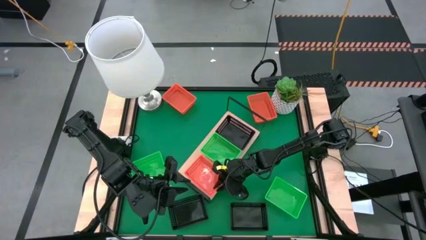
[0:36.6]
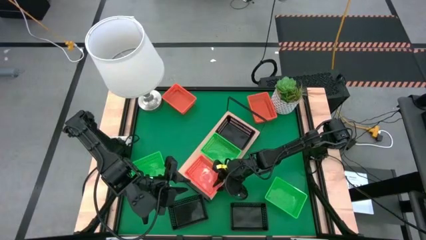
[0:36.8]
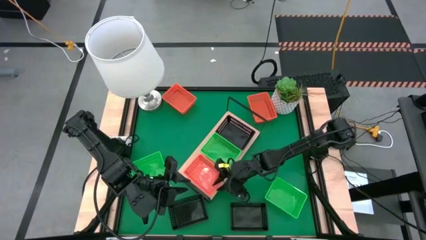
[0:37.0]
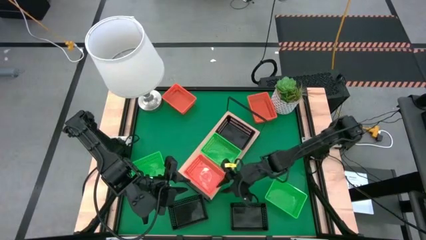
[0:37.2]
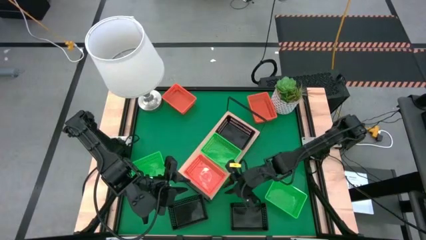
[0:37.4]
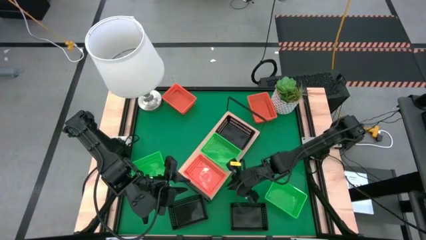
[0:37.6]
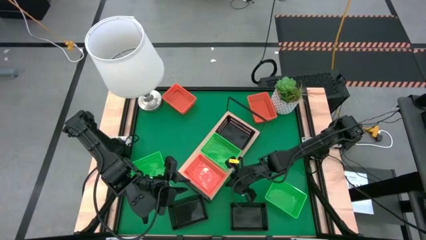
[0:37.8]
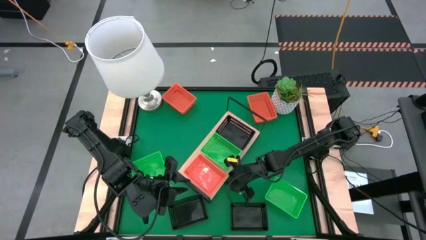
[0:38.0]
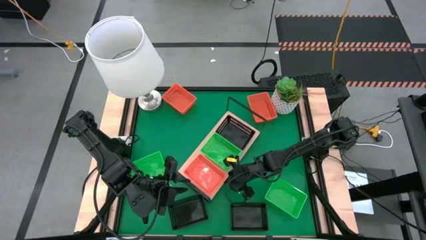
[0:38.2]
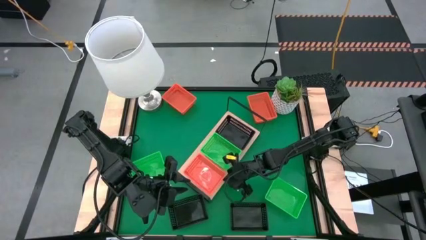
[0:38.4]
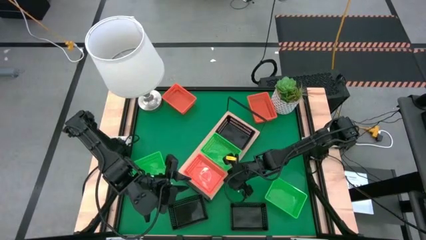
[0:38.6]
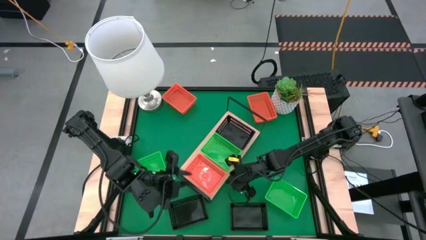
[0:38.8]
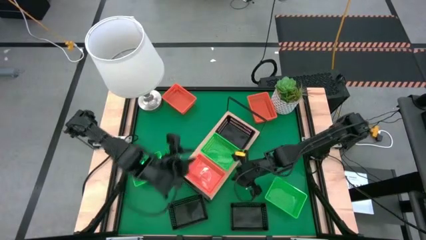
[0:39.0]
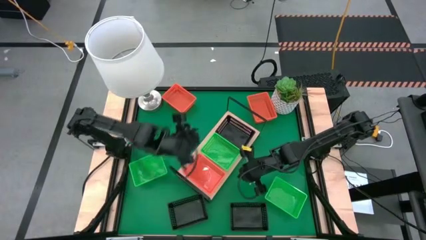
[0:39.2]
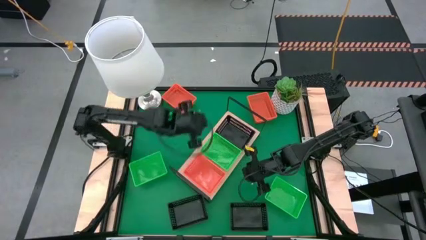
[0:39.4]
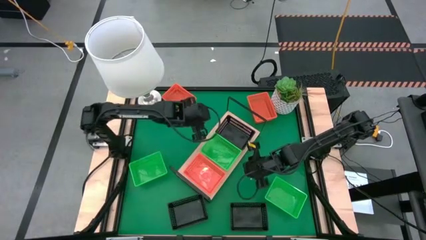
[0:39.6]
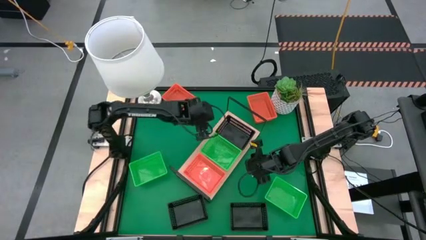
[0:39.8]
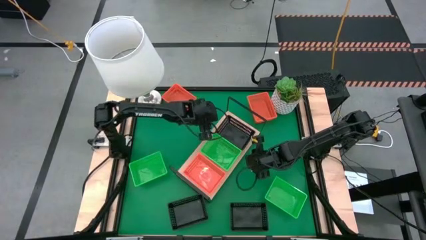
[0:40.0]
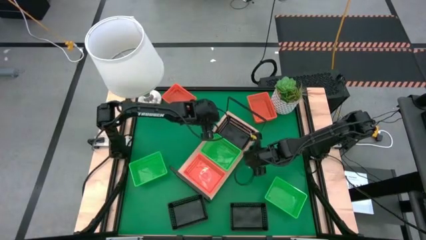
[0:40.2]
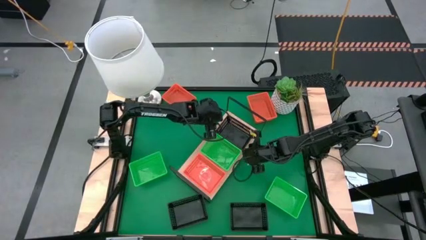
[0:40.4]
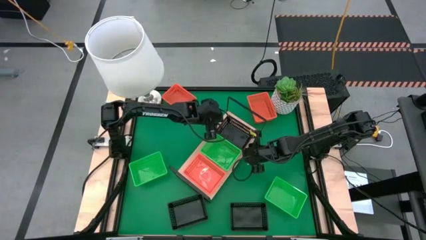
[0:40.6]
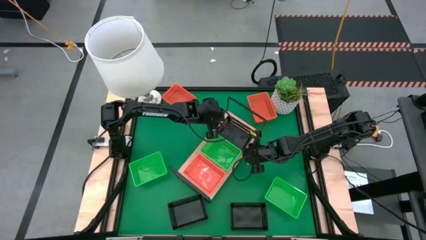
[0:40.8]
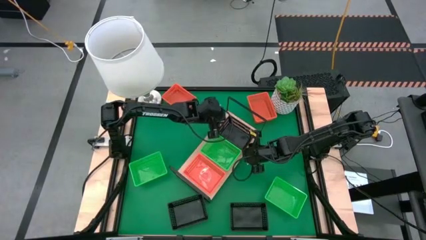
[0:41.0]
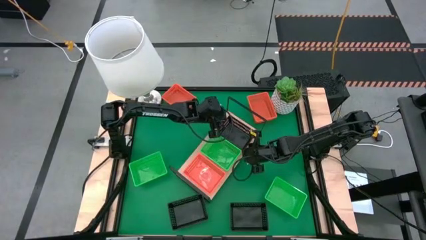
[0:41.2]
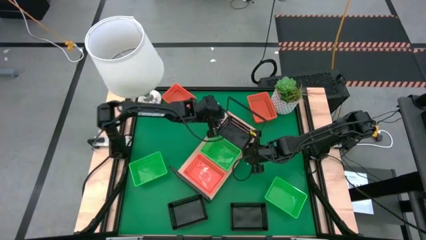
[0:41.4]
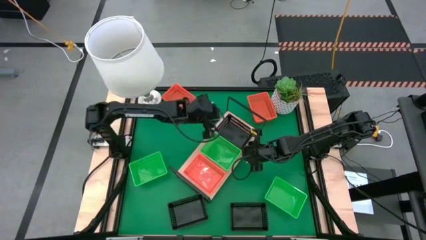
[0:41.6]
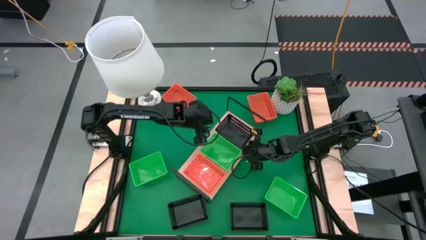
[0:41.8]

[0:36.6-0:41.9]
Task: Stack baskets on shelf by color
Adjust the colored bins

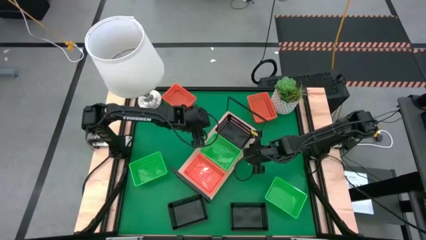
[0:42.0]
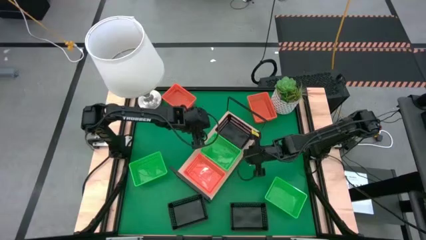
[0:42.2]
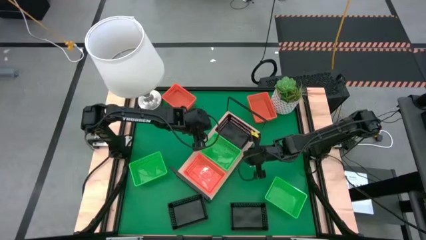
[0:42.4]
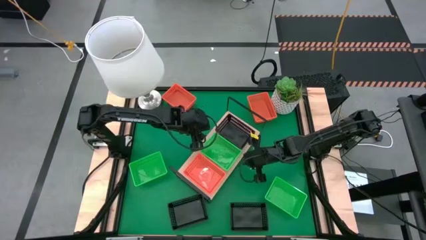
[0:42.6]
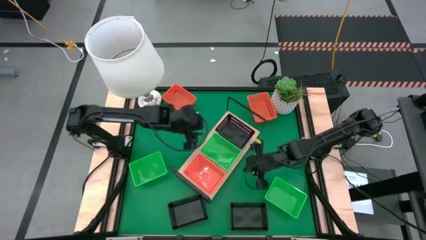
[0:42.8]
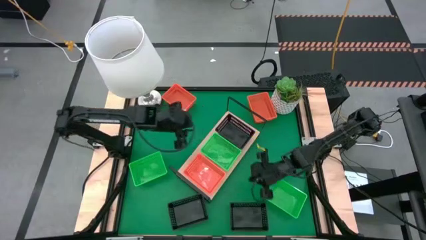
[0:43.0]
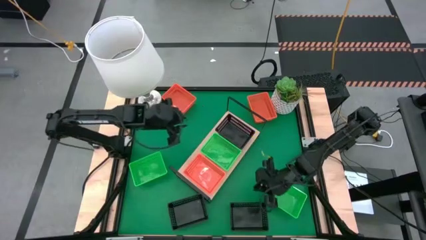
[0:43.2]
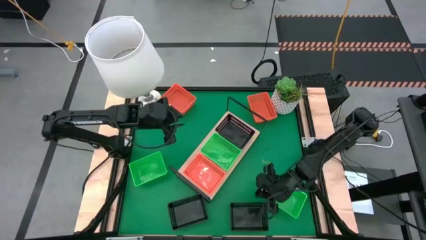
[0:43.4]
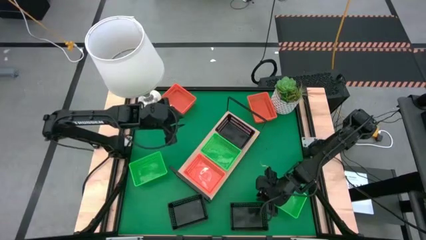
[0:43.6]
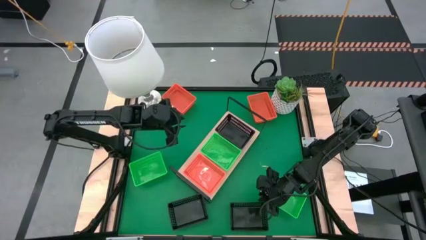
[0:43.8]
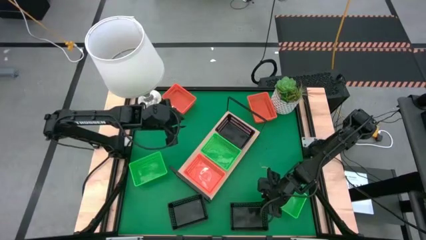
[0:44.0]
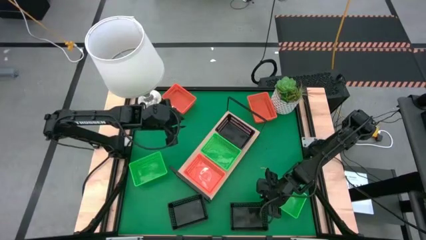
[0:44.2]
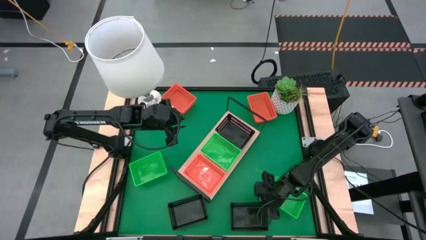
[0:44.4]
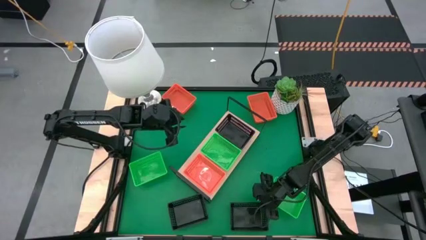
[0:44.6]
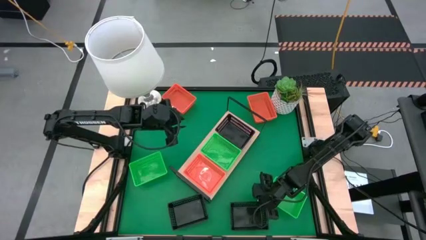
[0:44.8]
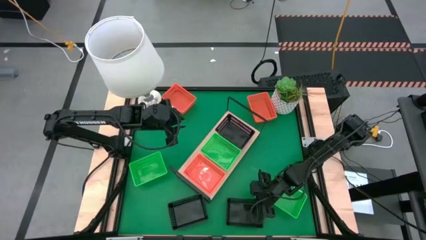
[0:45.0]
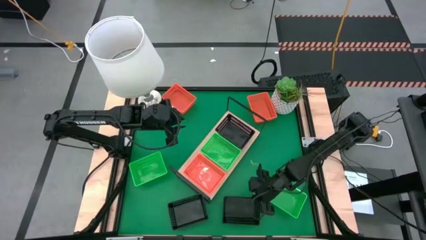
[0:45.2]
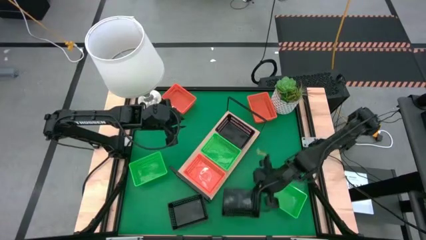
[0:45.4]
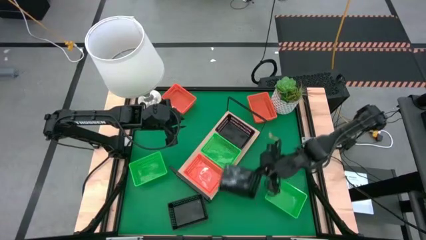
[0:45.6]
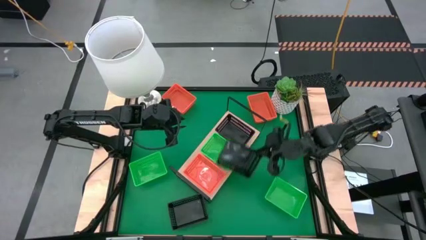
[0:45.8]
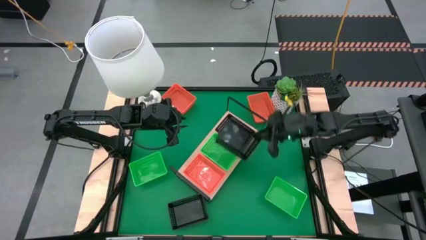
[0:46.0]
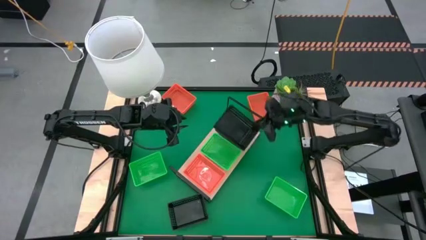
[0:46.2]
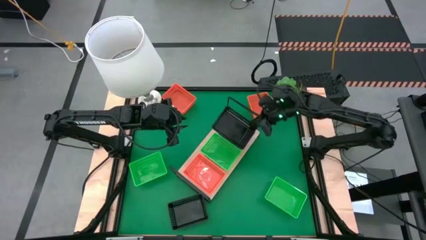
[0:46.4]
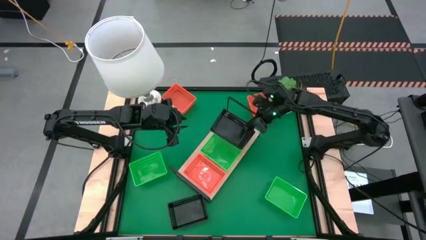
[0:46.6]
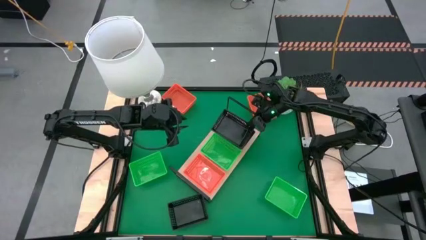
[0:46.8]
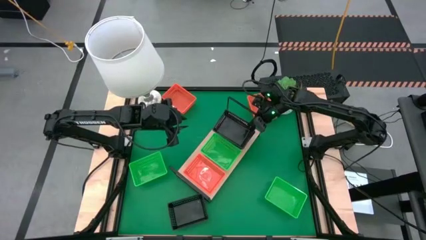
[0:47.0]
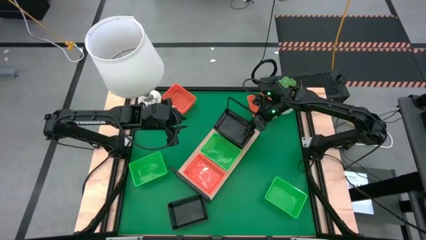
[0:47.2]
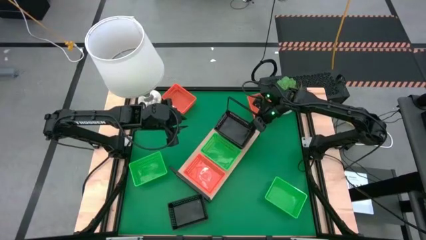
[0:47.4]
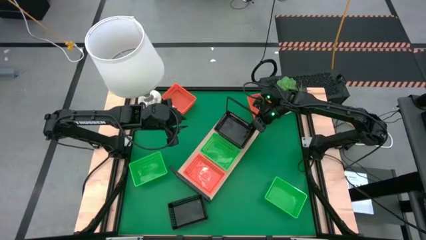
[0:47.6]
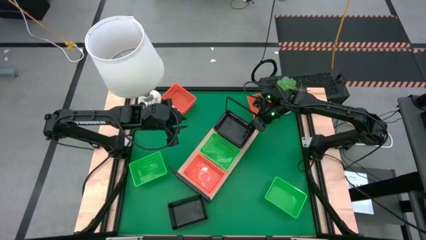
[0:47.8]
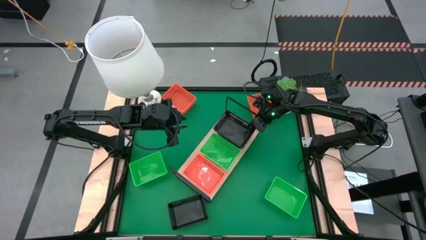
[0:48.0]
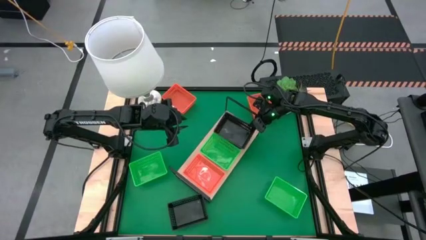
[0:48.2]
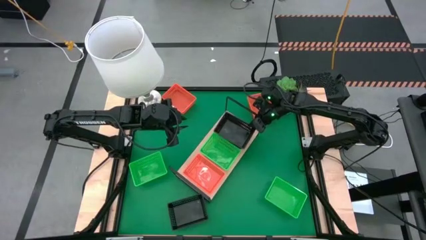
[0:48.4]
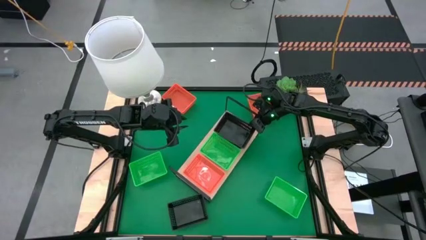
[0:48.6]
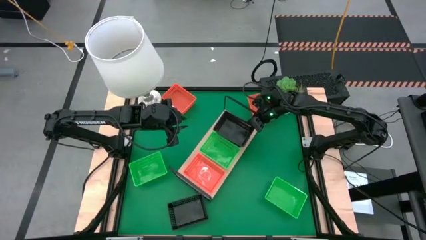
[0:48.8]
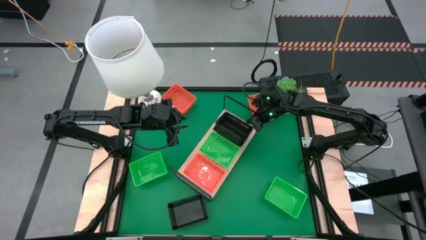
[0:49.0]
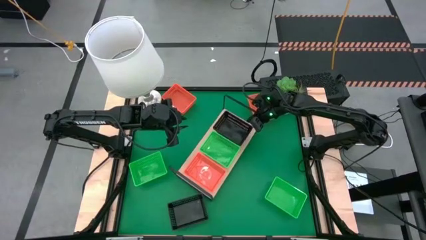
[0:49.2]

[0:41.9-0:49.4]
Stack the right black bin into the black bin on the shelf

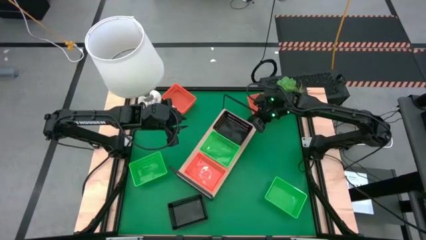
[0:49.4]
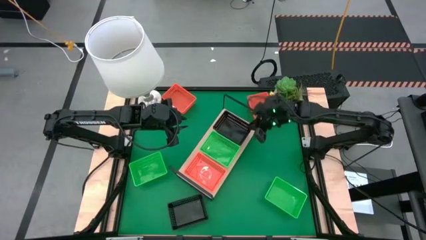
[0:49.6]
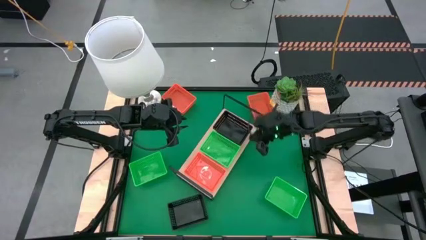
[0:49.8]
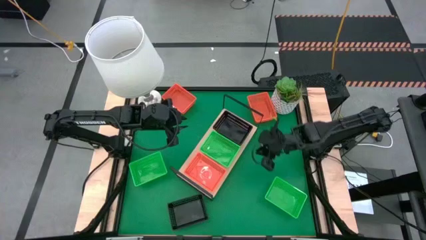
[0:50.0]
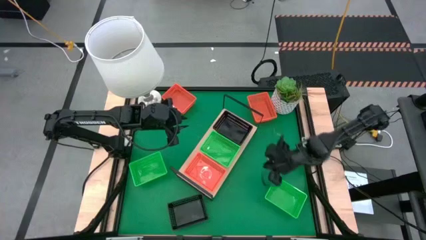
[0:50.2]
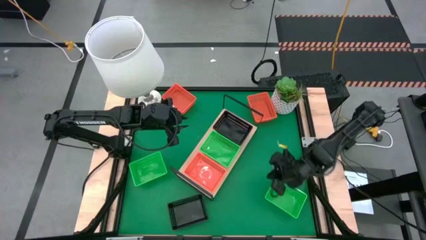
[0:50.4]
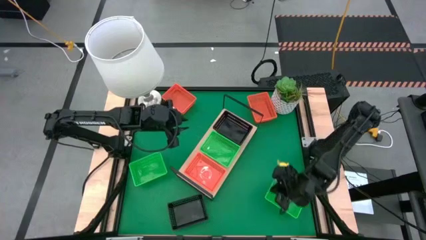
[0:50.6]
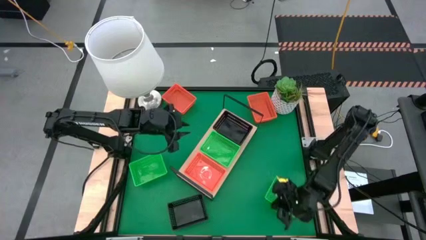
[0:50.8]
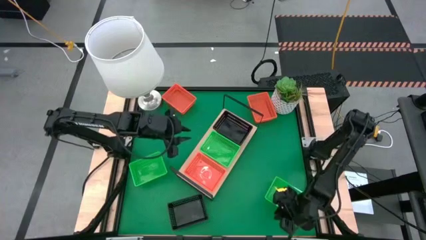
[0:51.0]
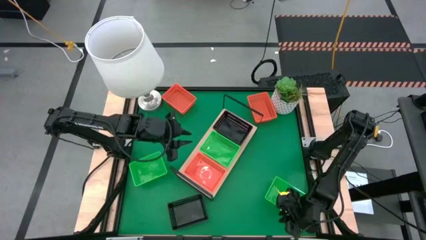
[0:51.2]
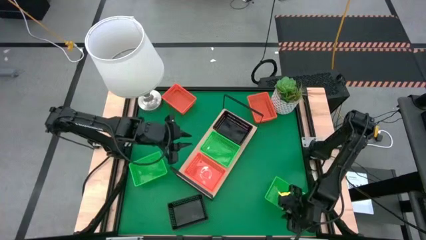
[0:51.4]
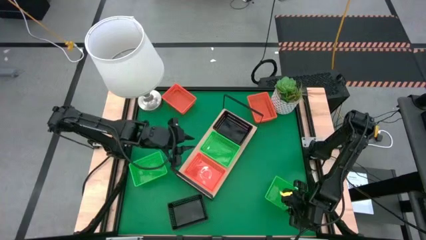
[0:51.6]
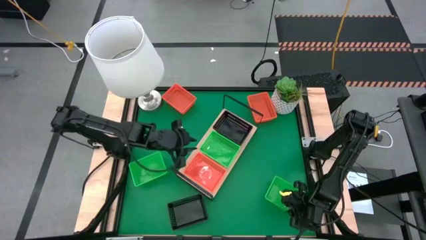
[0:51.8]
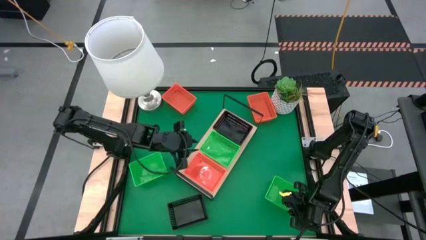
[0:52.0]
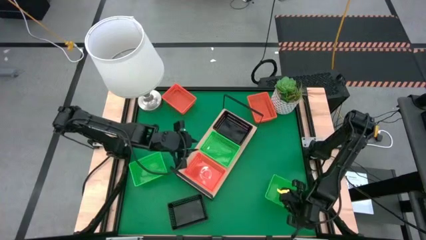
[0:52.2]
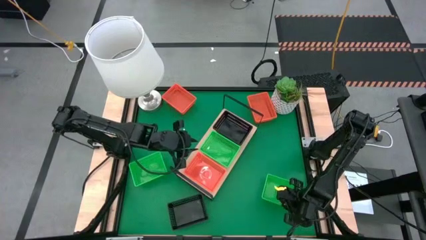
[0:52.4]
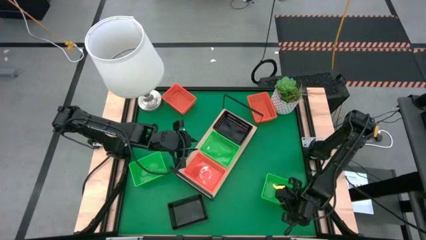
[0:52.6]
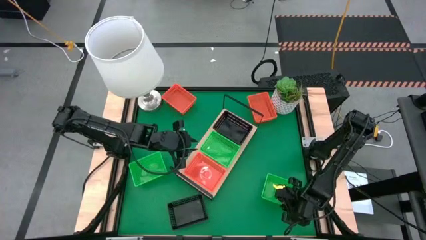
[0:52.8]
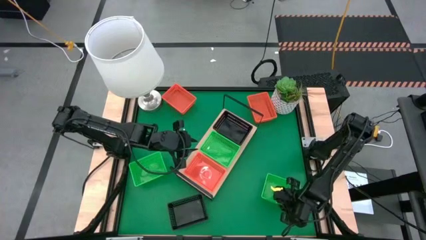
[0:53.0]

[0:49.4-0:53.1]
Stack the right green bin into the green bin on the shelf
